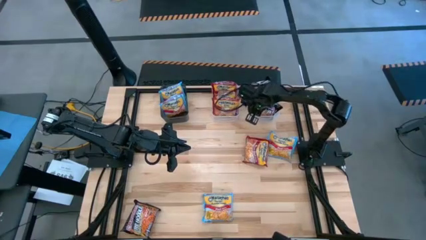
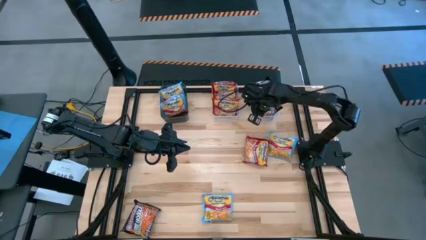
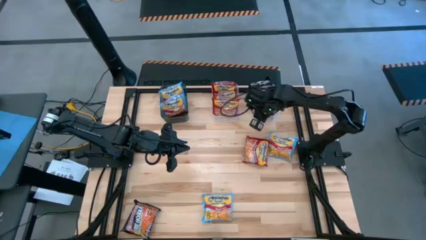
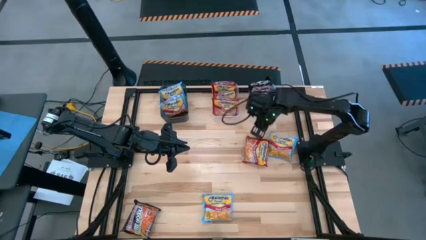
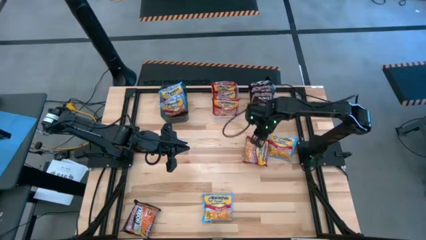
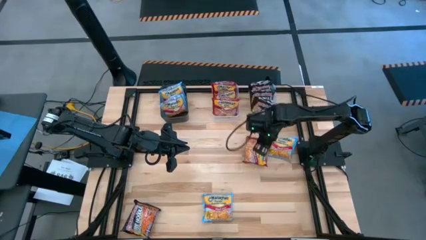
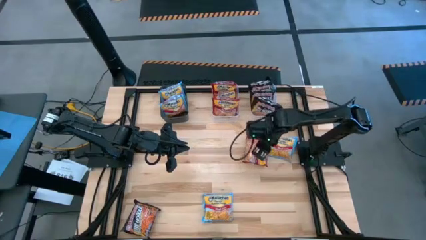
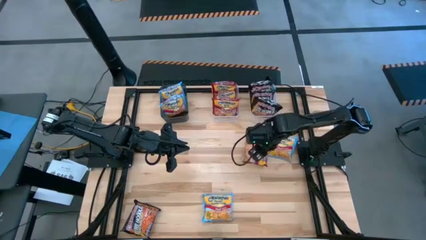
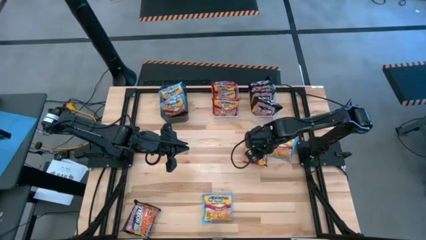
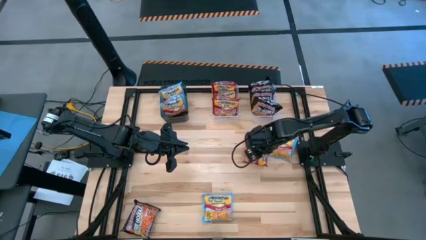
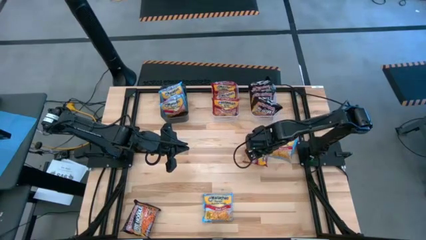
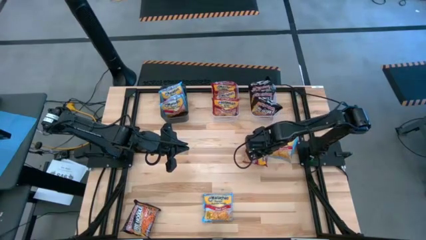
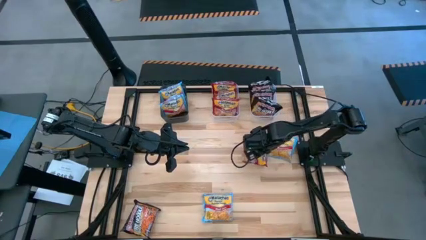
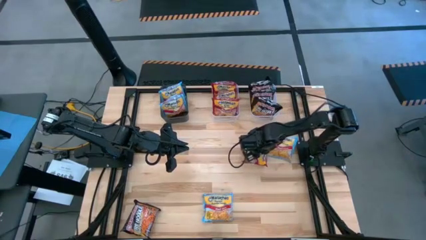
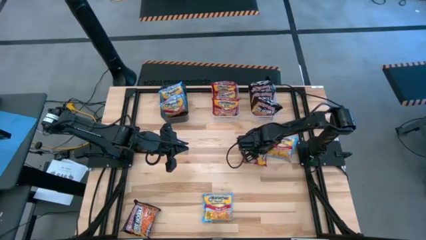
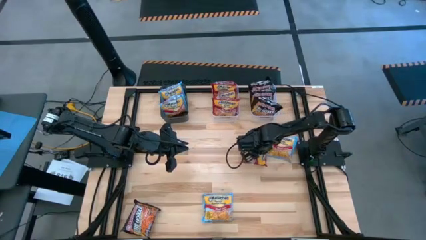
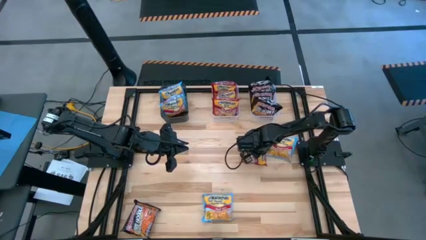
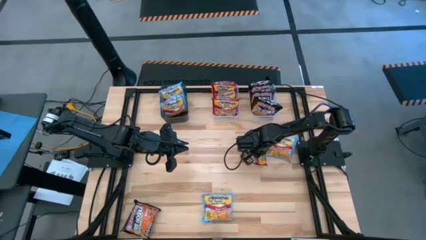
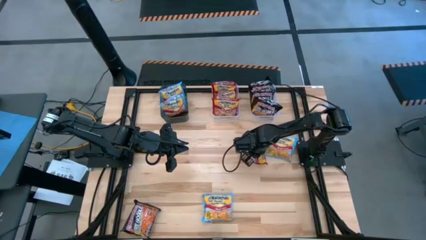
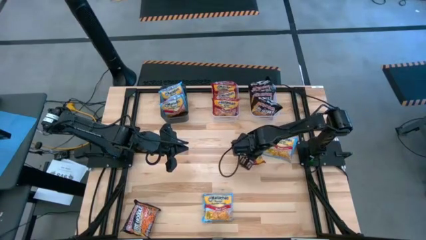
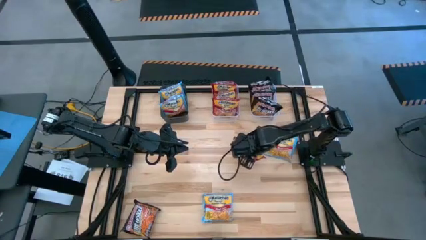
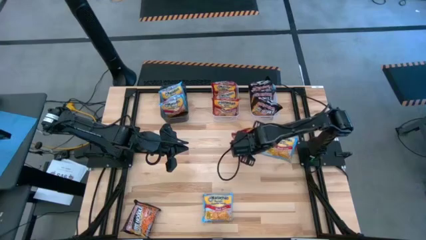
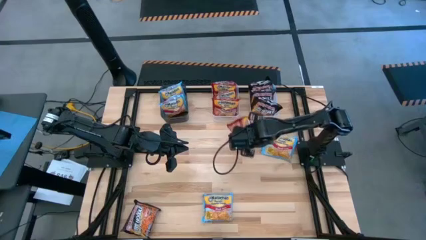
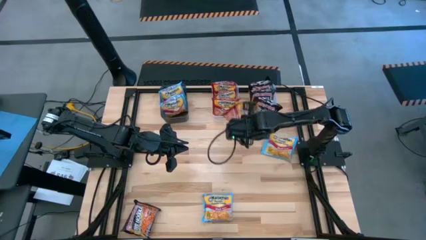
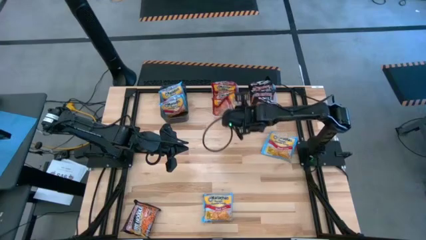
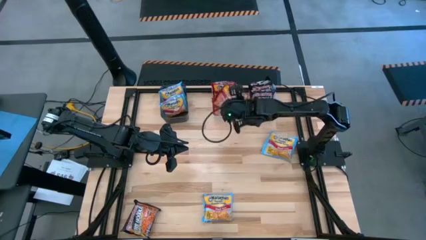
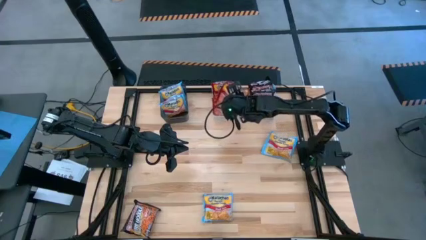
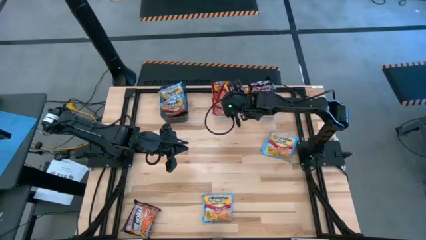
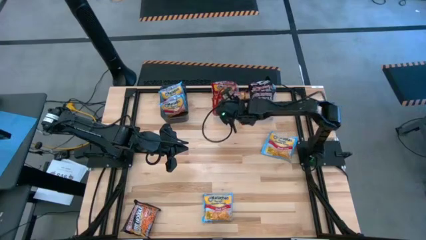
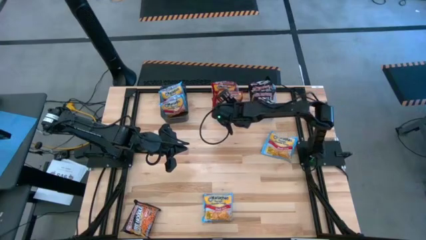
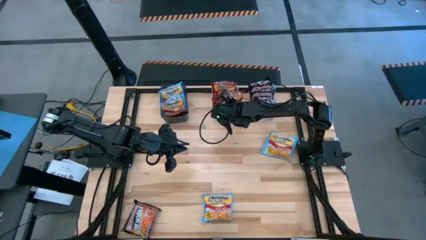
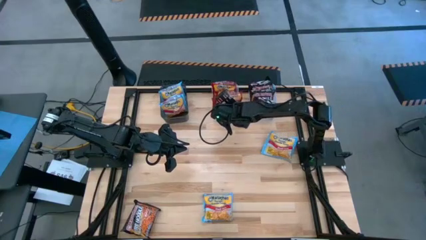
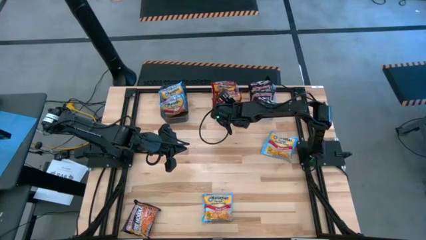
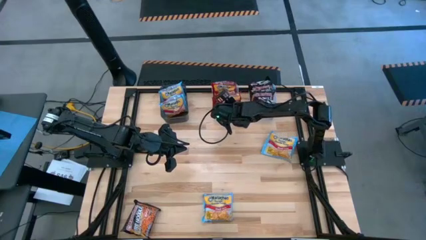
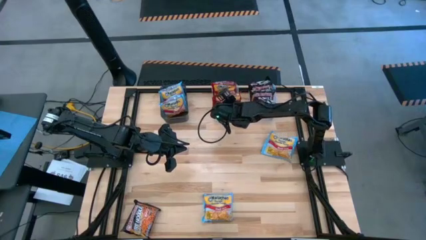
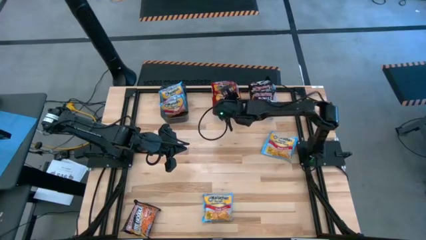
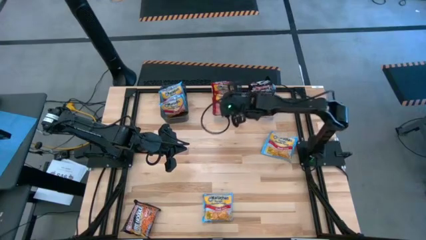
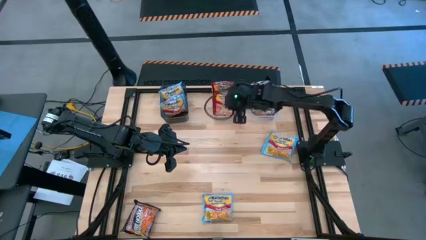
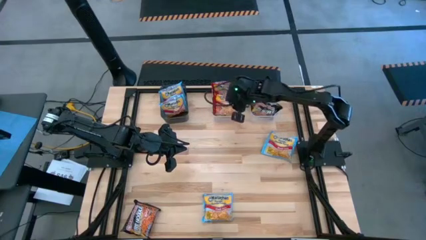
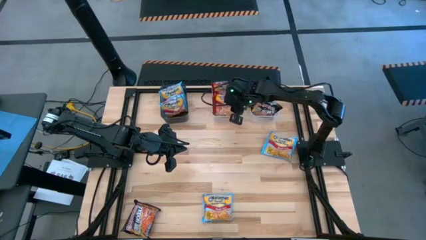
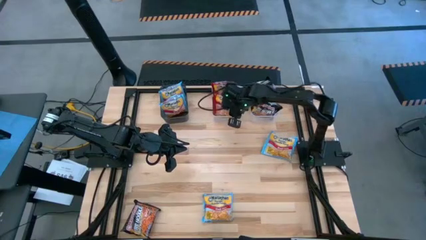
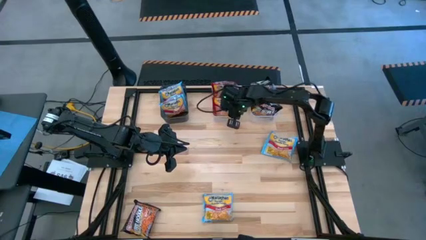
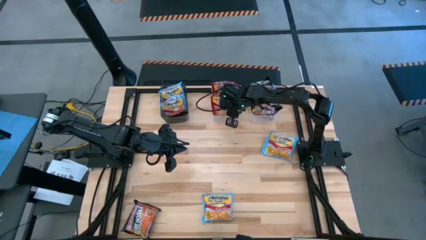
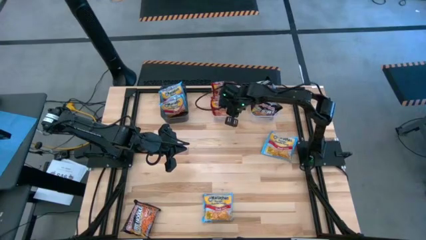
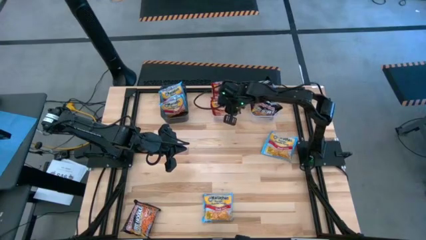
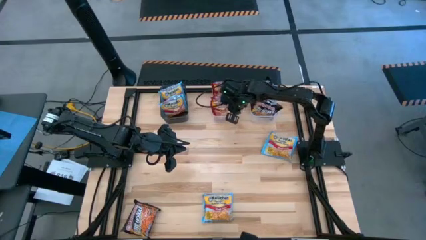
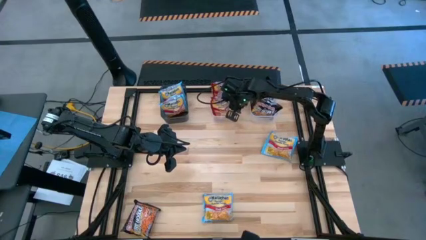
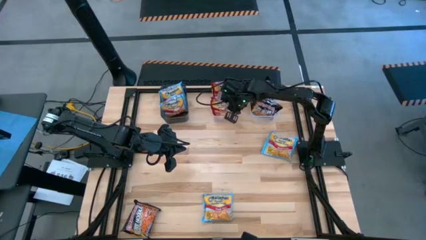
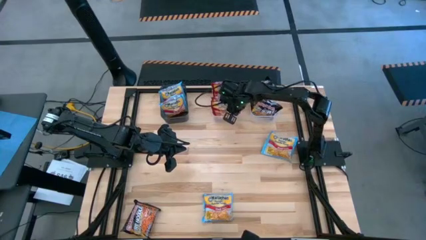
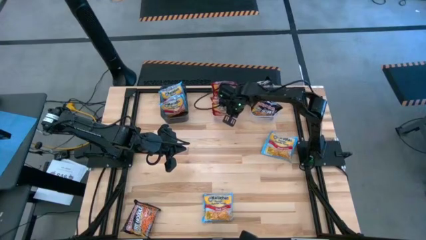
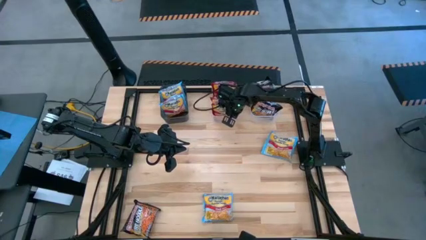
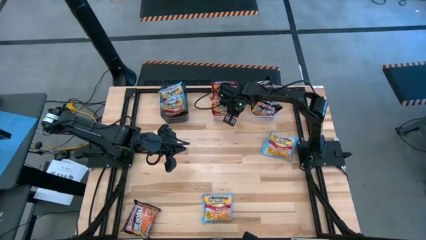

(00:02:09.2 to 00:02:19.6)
Task: Sort Maruchan noodles
Put the red noodle pack into the left transparent bin

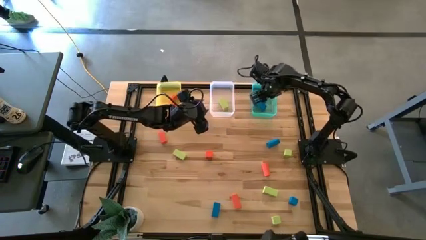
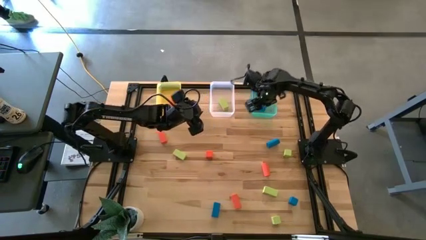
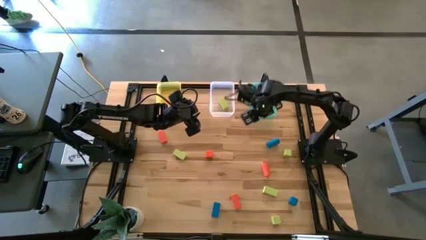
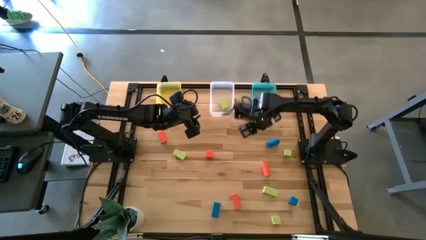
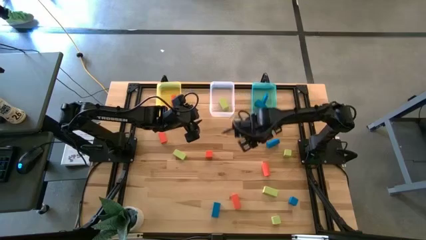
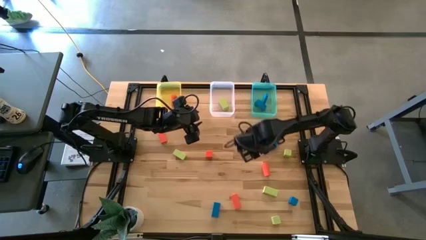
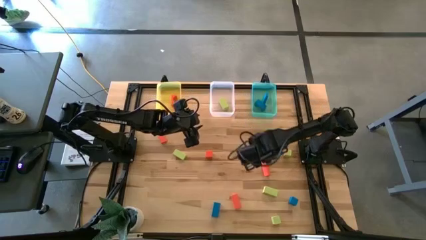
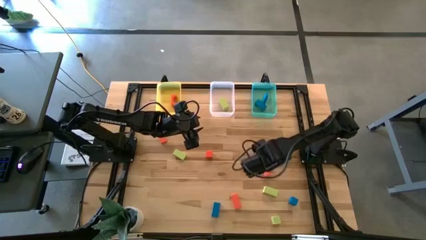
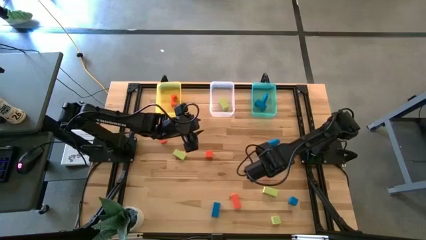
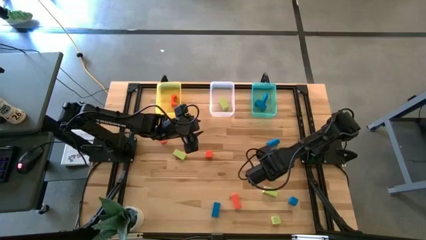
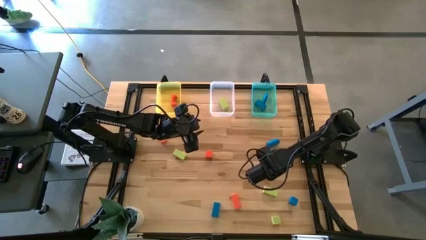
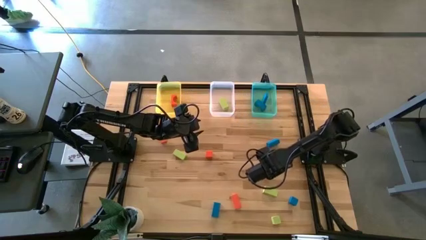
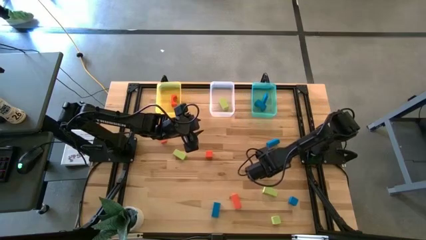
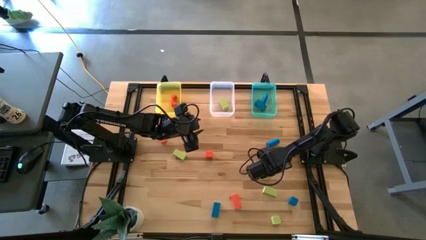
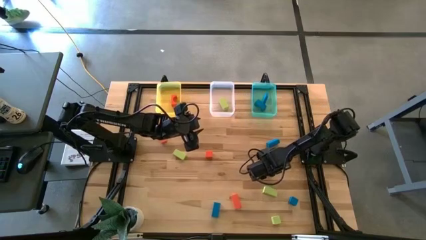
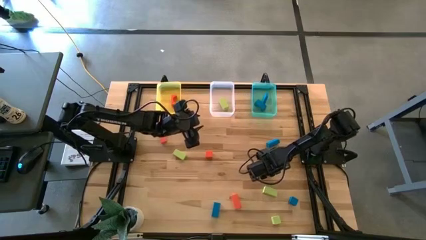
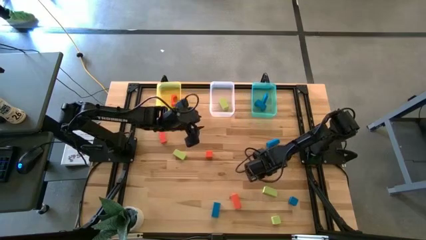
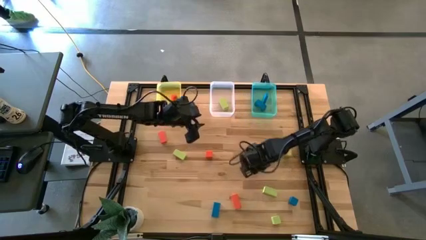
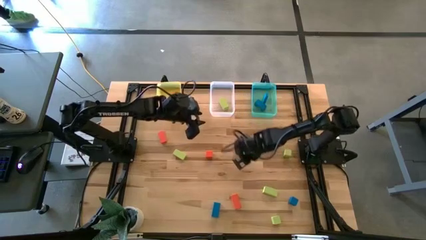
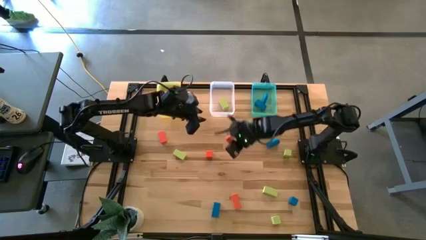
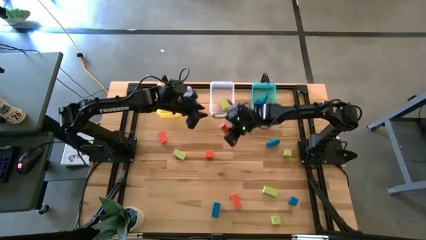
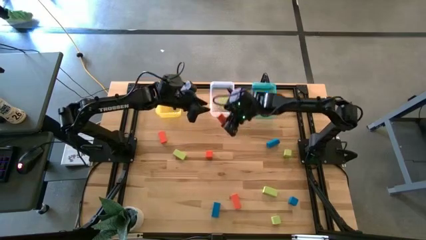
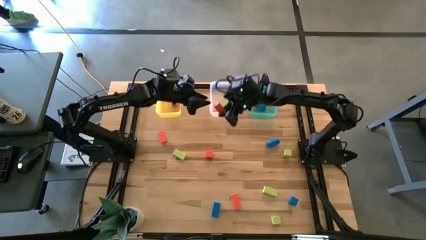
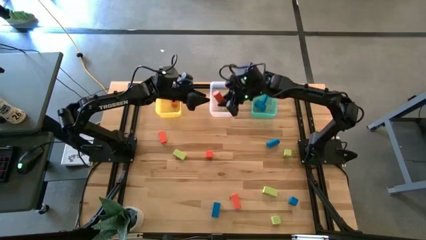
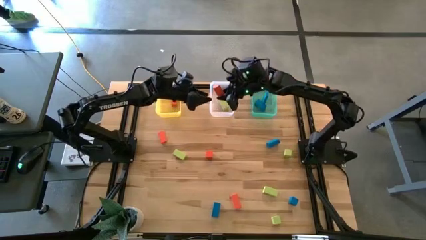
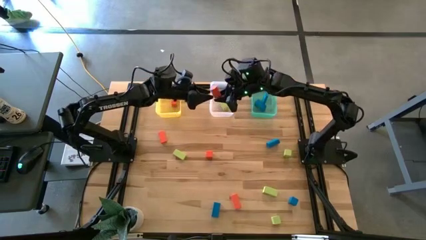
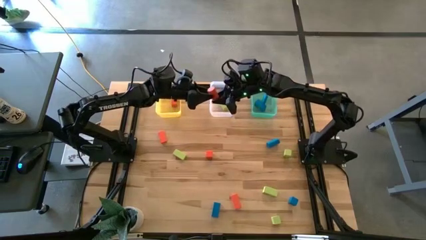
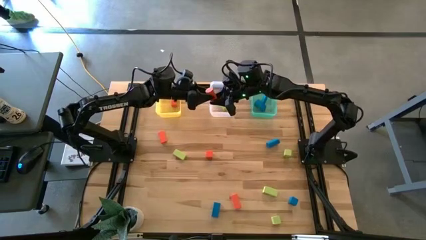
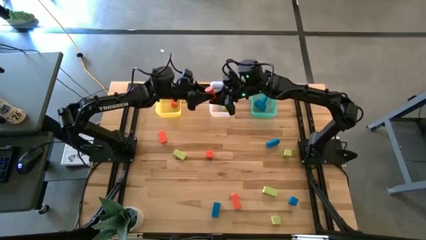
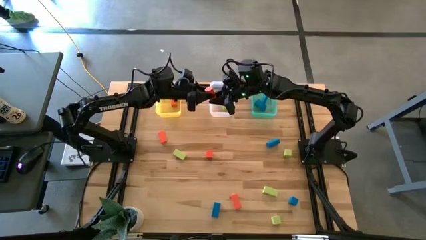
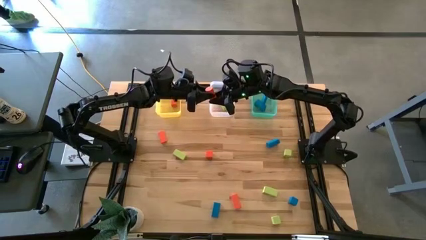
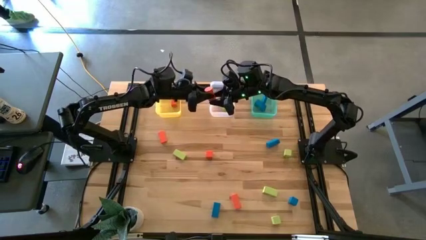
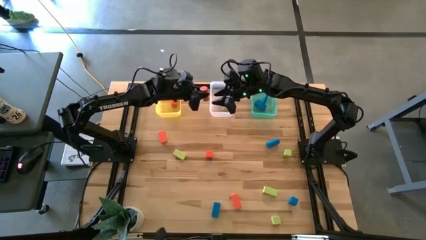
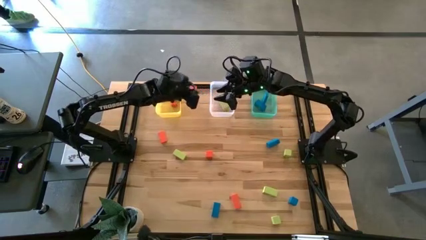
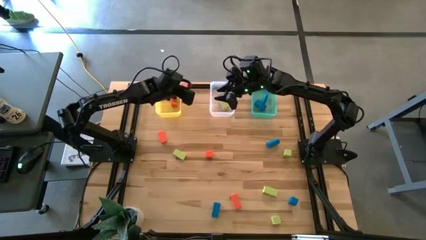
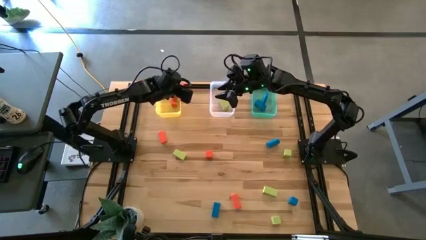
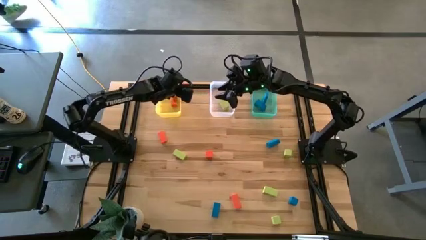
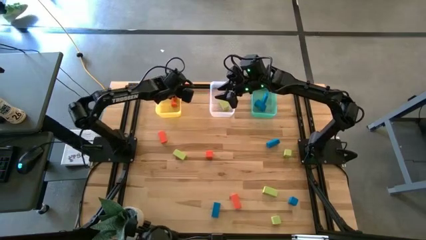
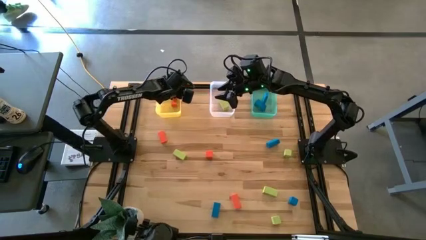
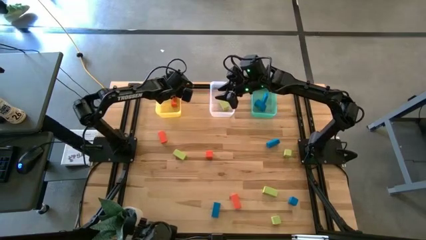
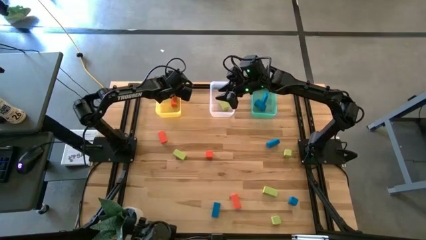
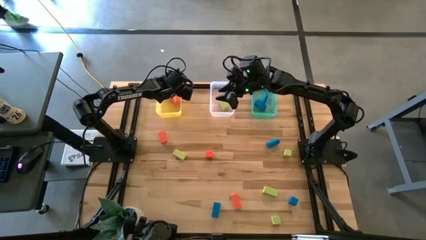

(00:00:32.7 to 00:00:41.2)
Task: Sort & place blocks by color
Put the orange block into the yellow bin
